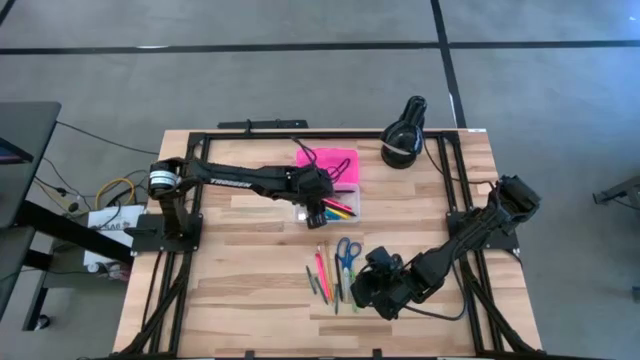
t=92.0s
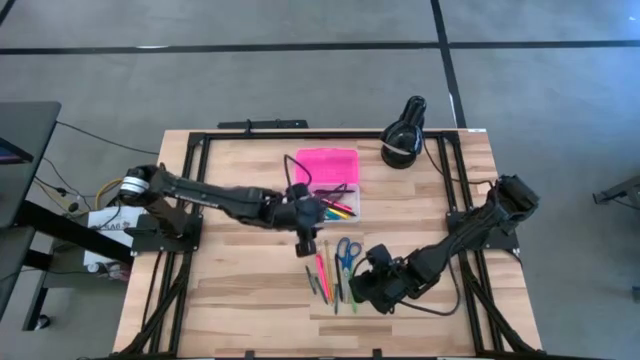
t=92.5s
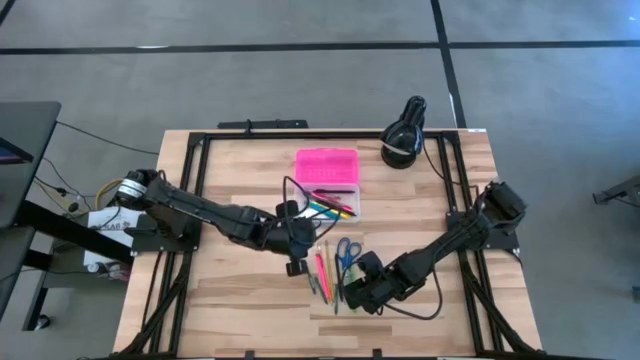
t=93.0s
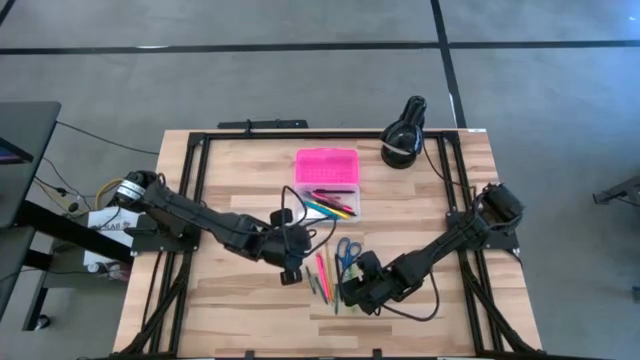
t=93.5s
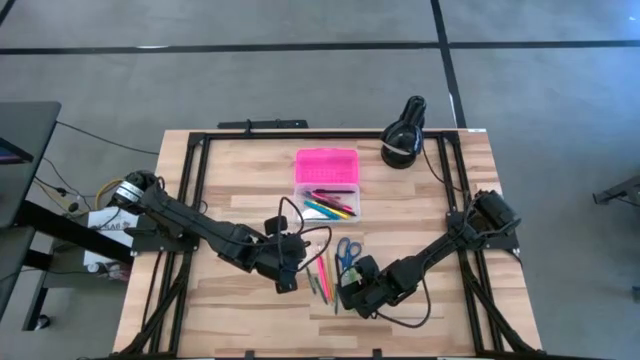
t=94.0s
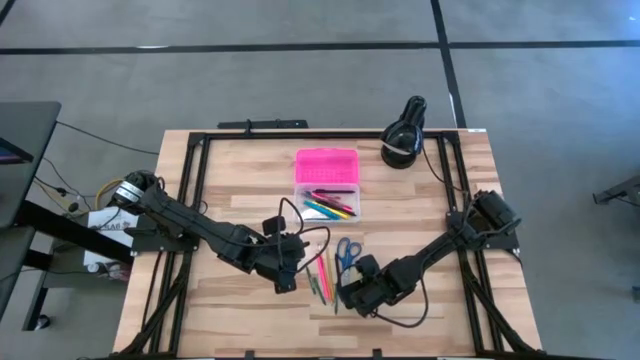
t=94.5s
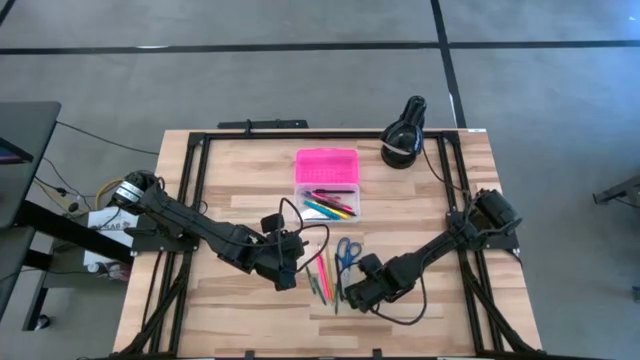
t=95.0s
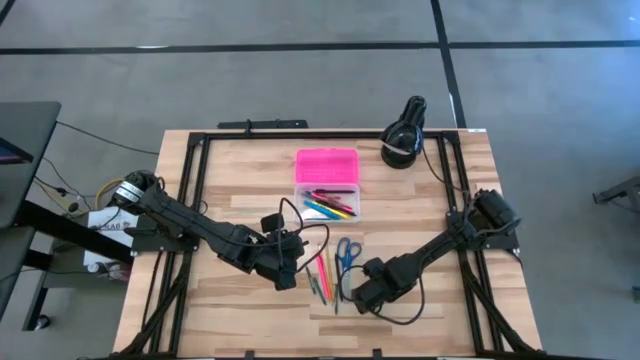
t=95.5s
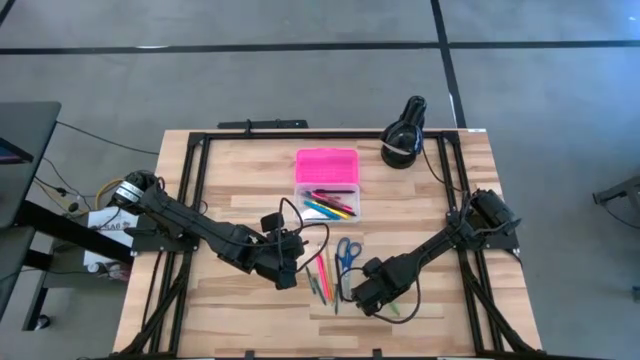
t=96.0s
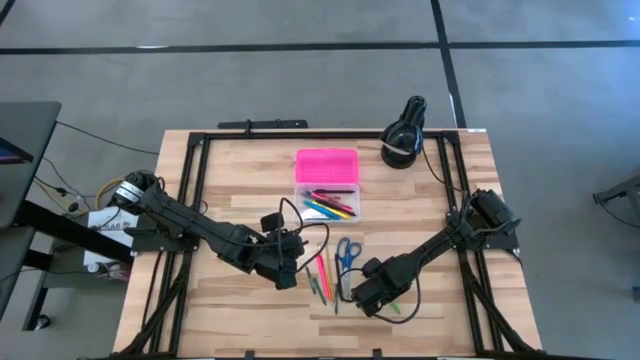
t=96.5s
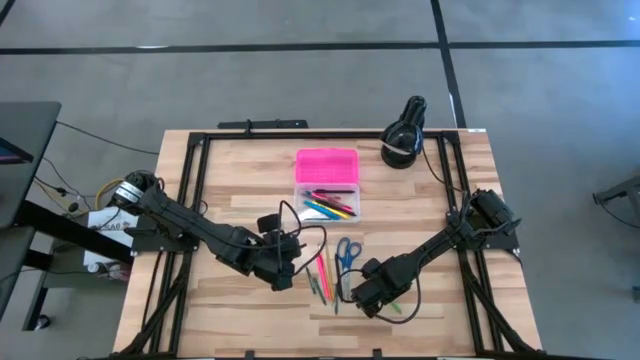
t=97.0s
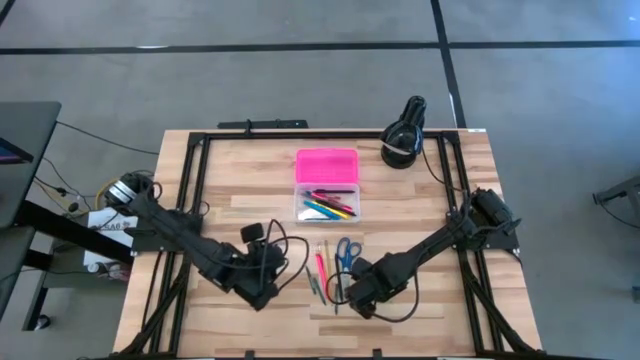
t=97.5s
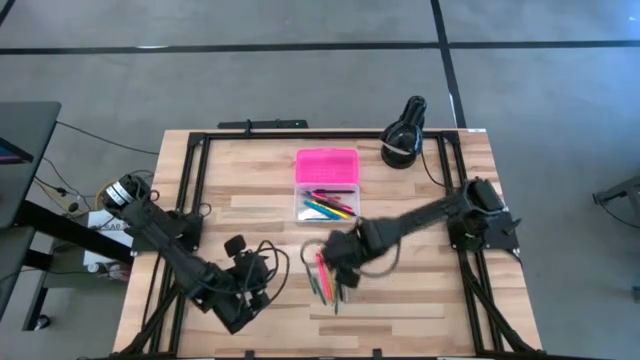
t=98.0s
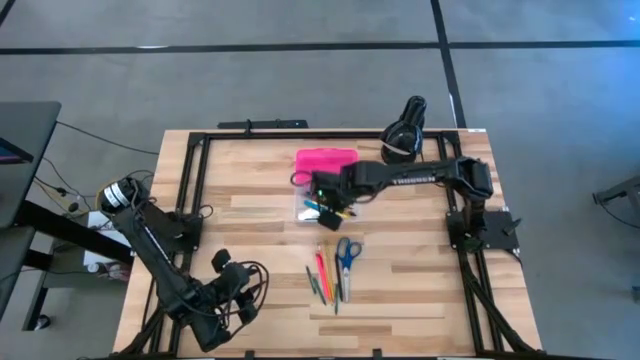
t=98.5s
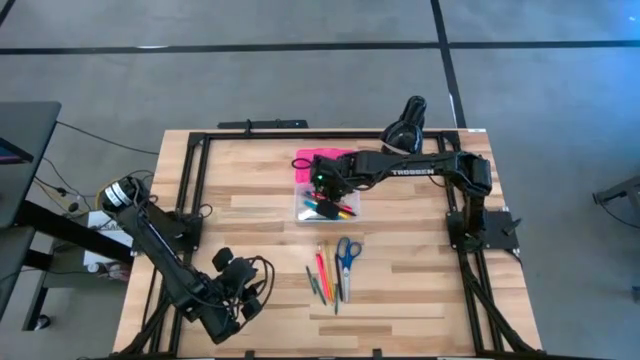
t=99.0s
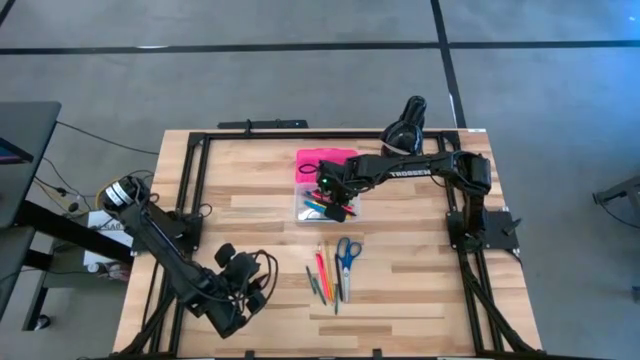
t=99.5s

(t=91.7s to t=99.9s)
Task: Pick & place school supplies into a supply box
Put the green pen into the pink supply box

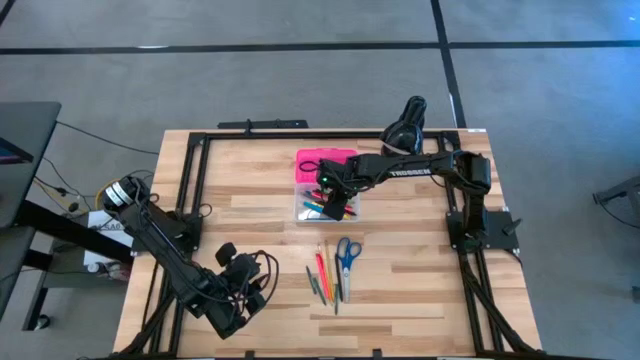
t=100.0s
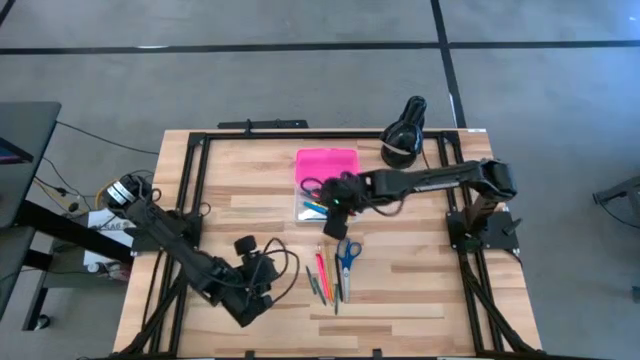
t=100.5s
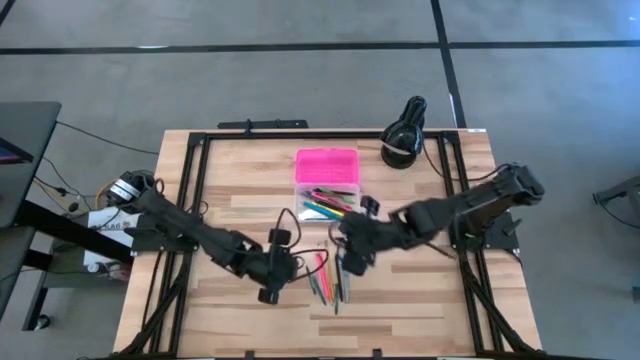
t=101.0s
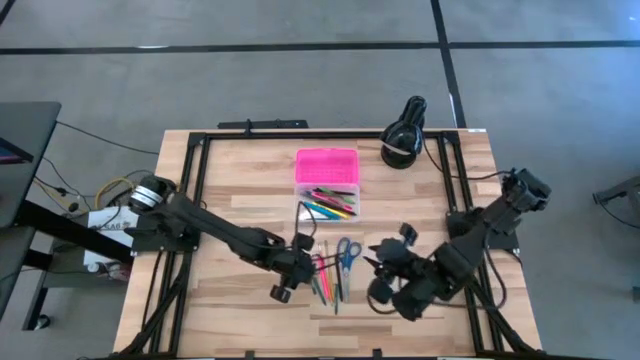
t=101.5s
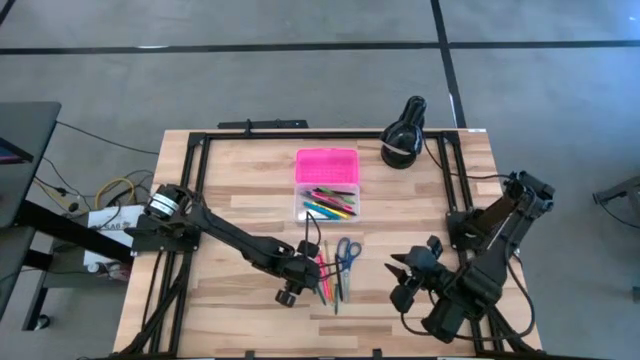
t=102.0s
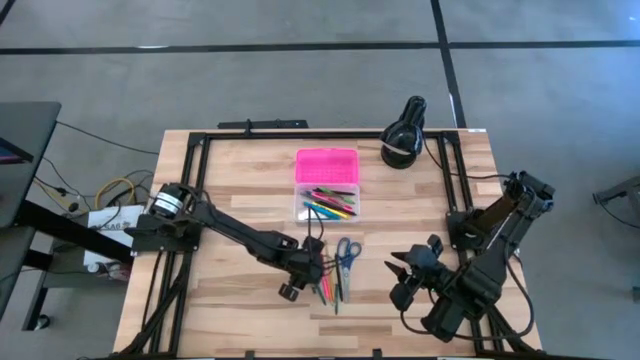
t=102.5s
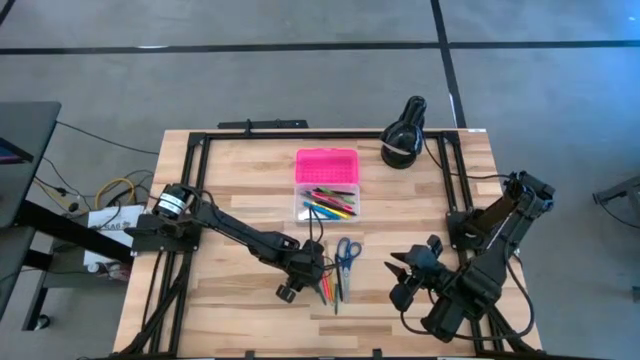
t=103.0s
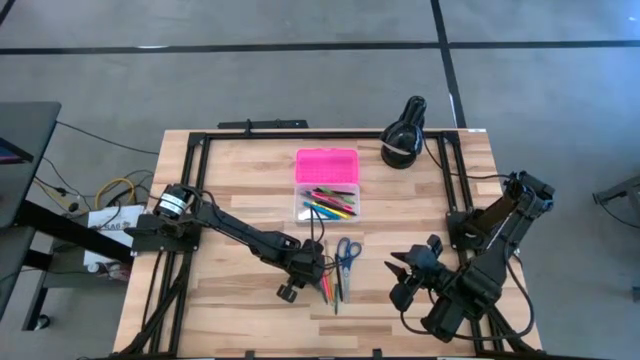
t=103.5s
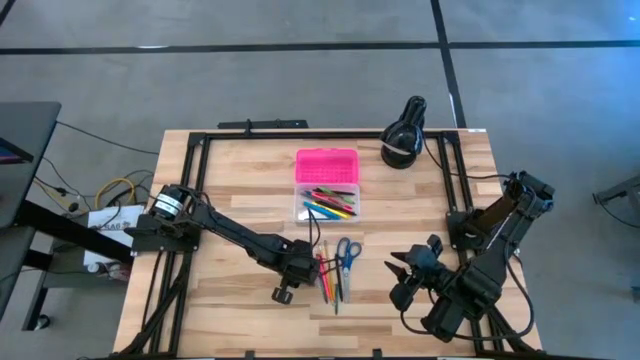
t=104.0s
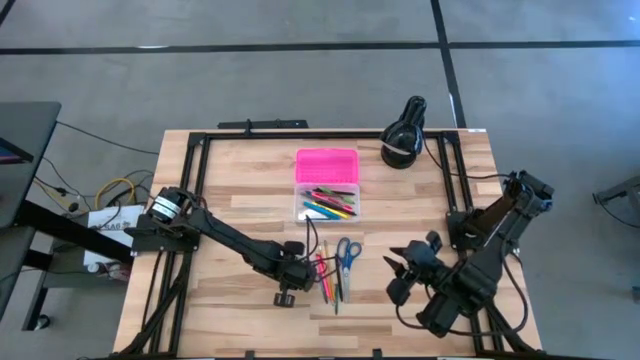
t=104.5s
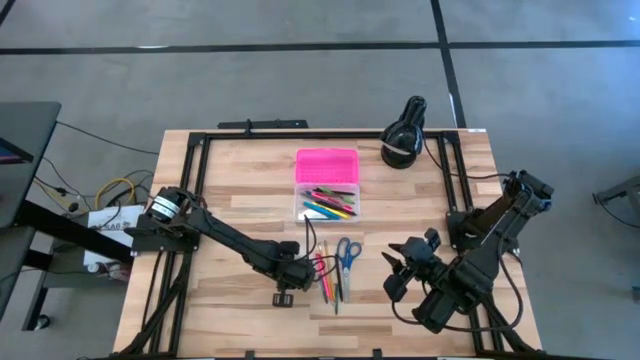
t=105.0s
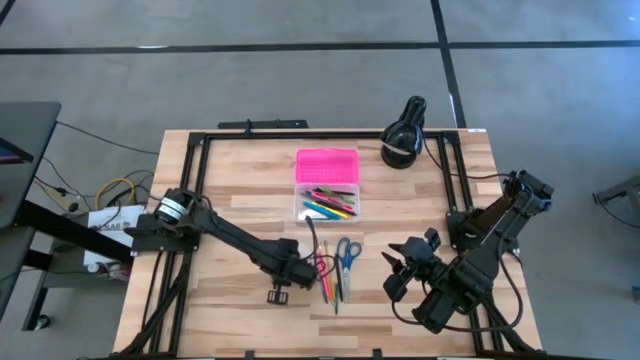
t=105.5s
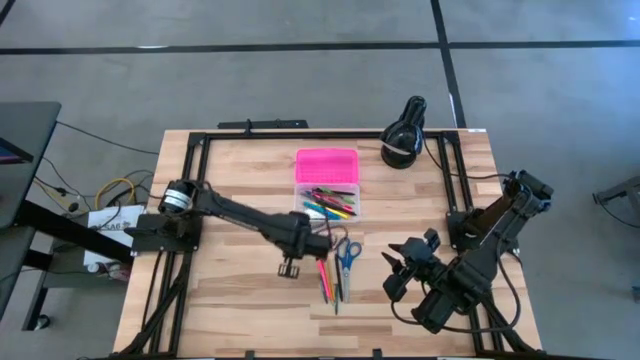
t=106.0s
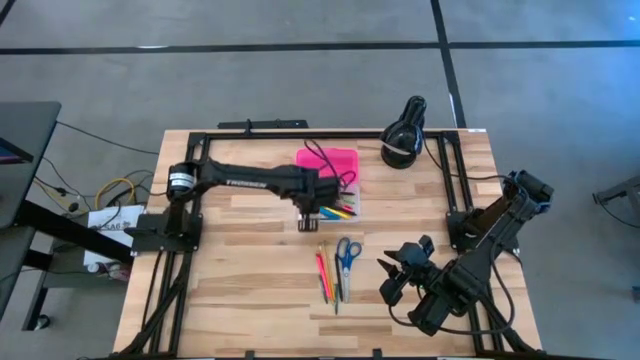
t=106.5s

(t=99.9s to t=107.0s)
Put the green crayon into the pink supply box

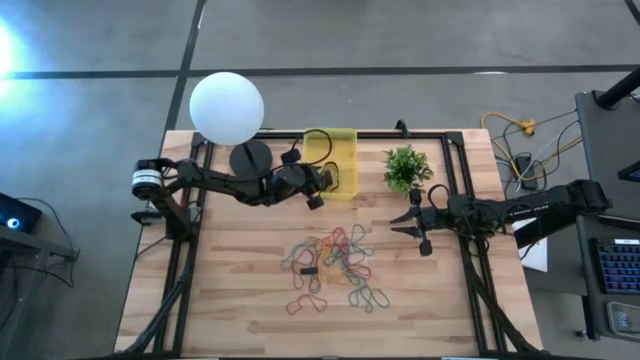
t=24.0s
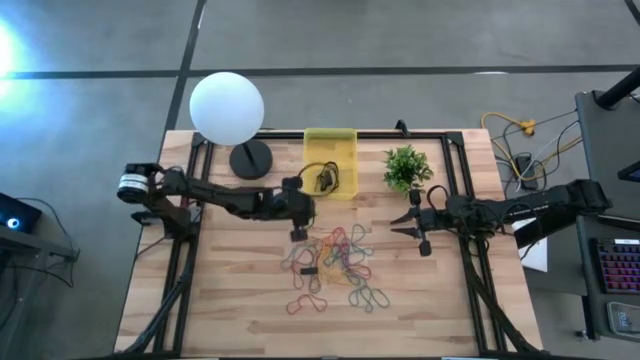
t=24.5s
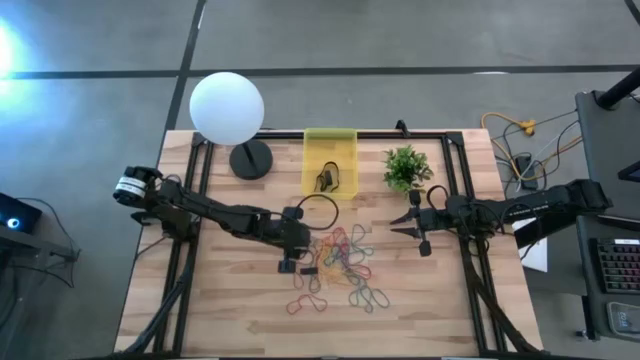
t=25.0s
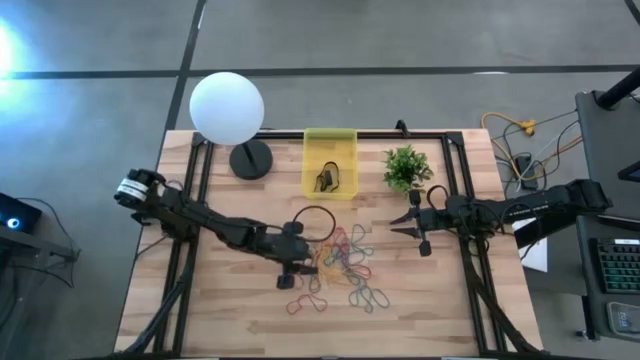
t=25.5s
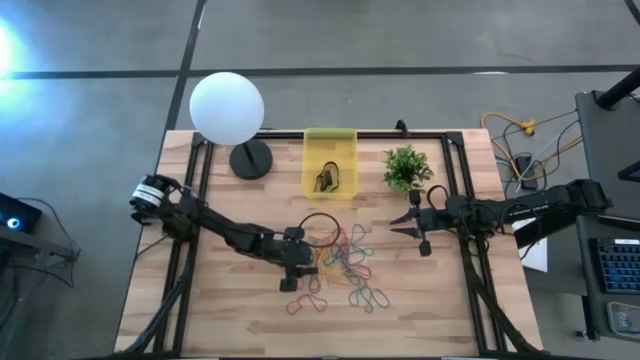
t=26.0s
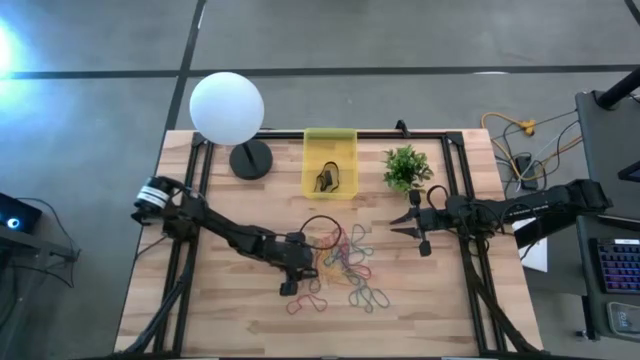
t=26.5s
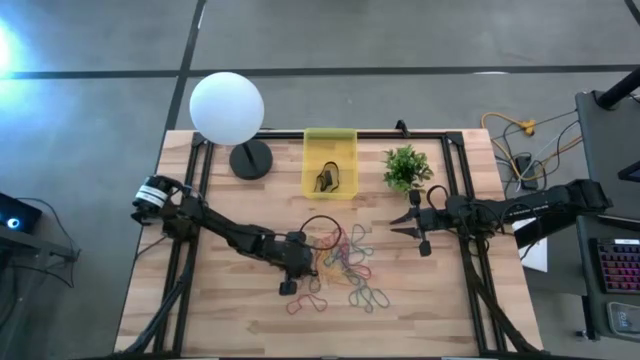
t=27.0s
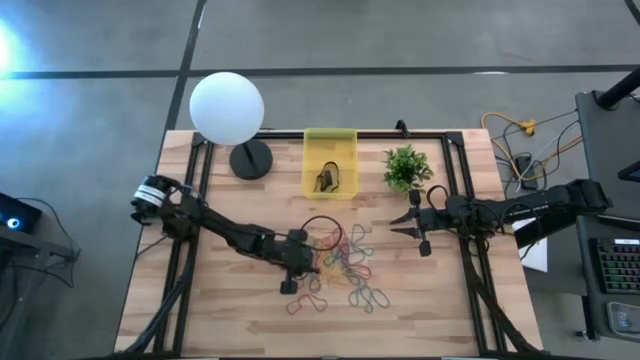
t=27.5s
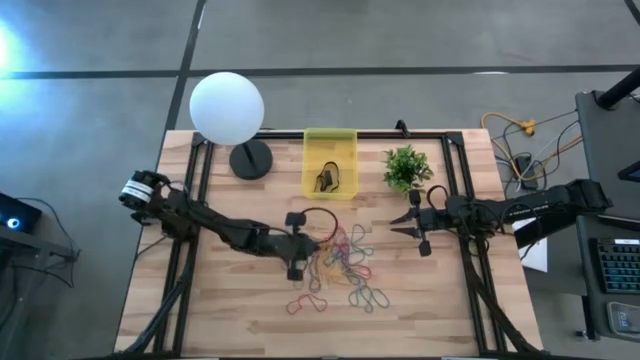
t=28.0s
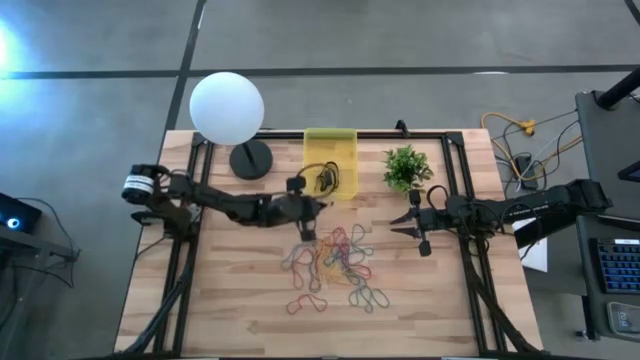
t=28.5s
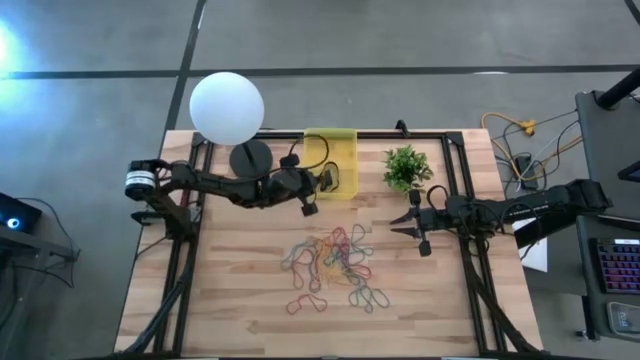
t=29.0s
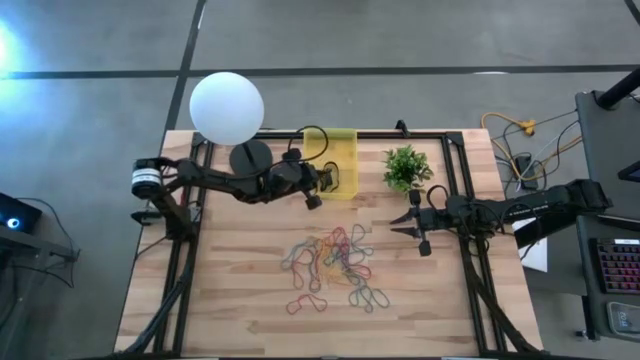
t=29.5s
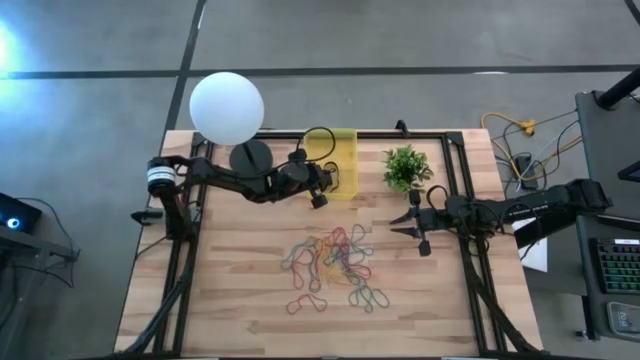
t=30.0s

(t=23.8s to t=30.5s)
Task: Pick and place rubber bands into bin
Put the black rubber band into the yellow bin
